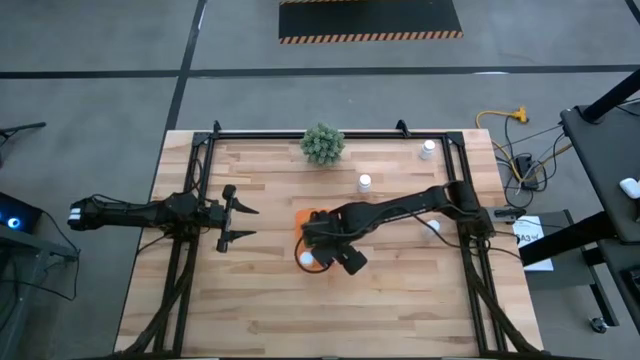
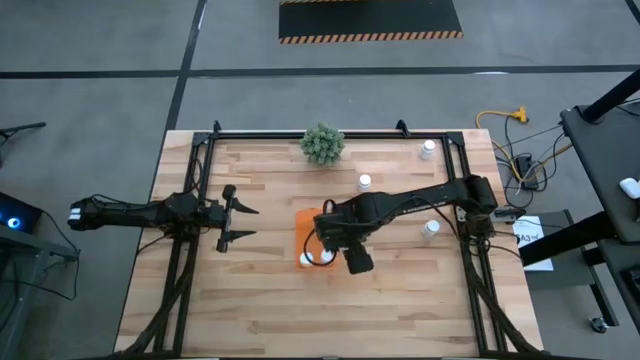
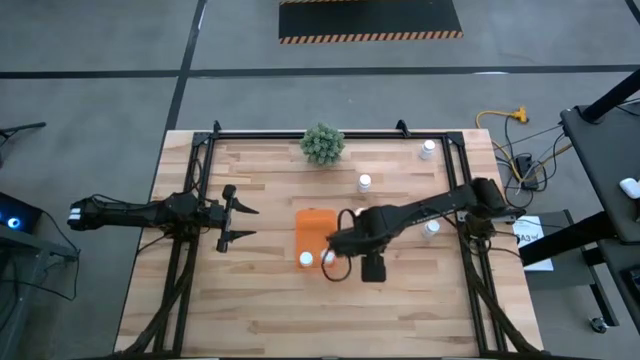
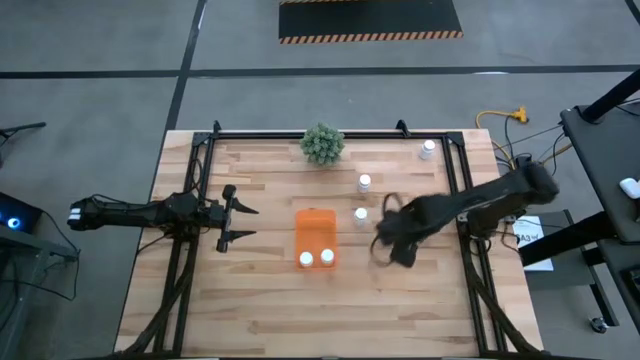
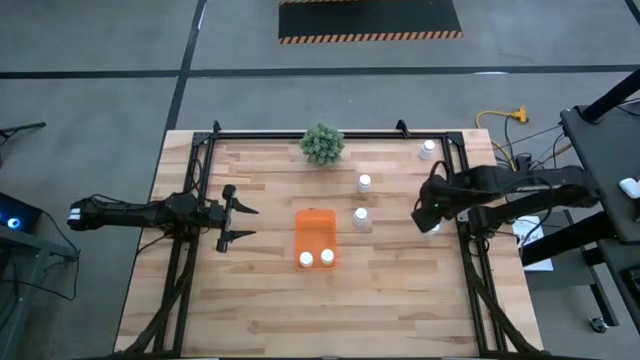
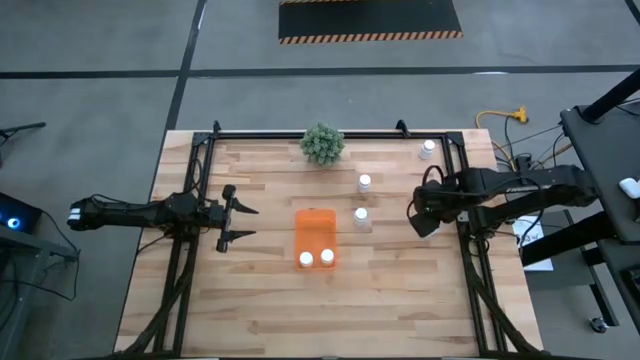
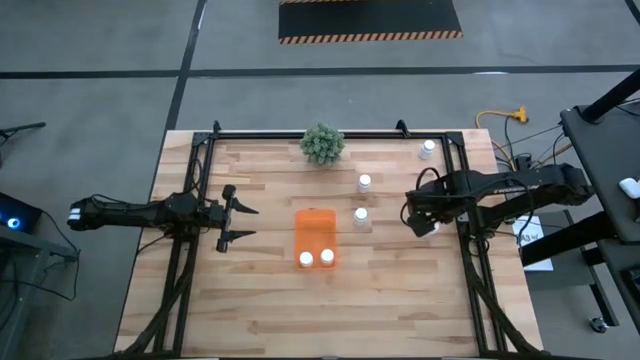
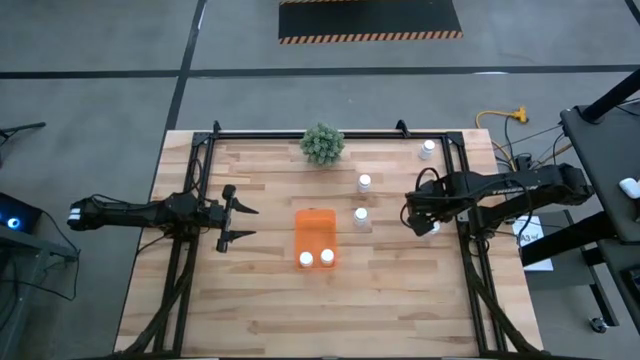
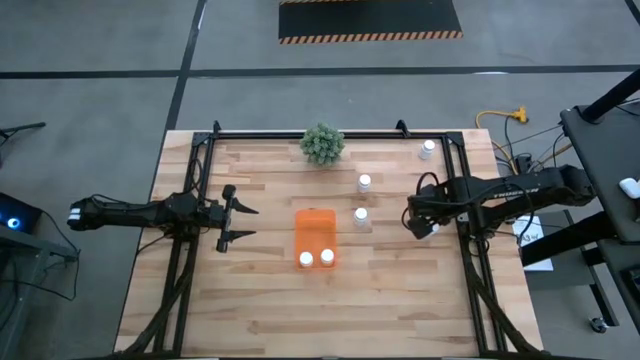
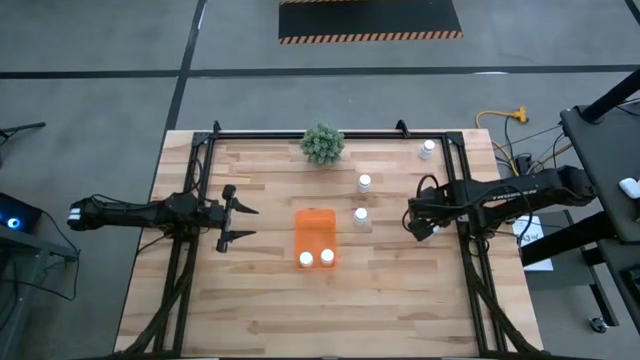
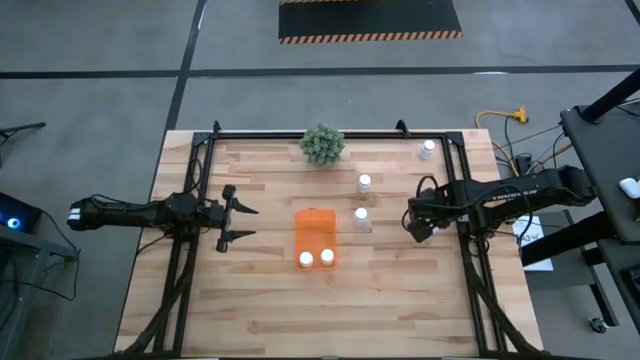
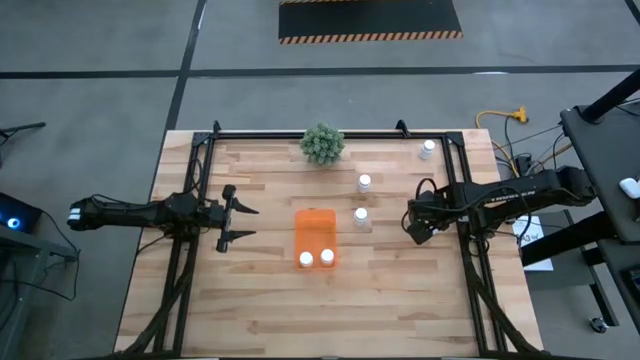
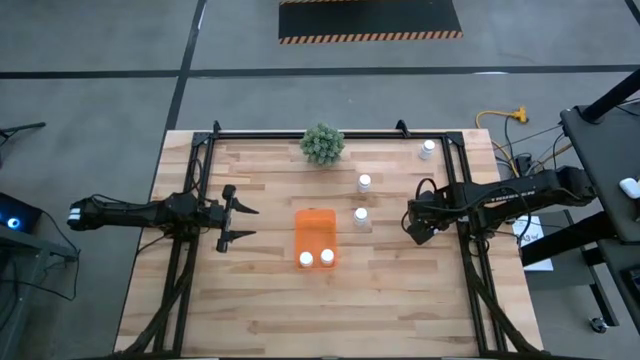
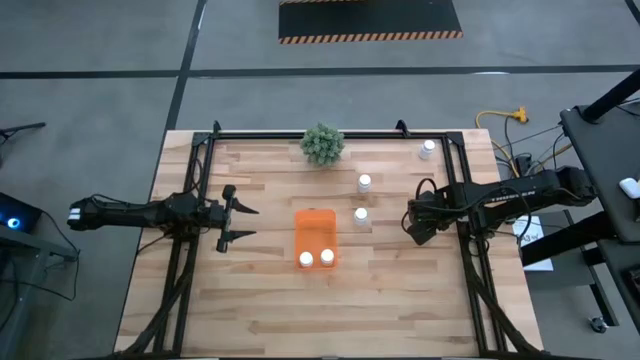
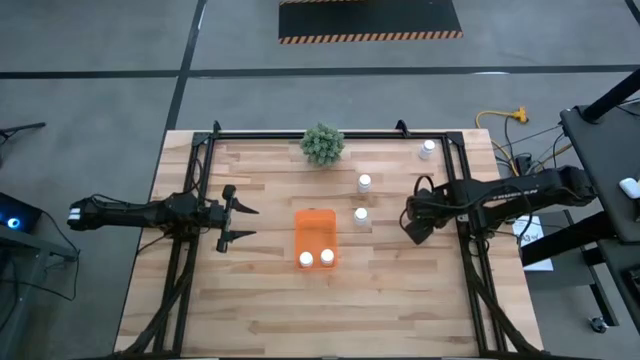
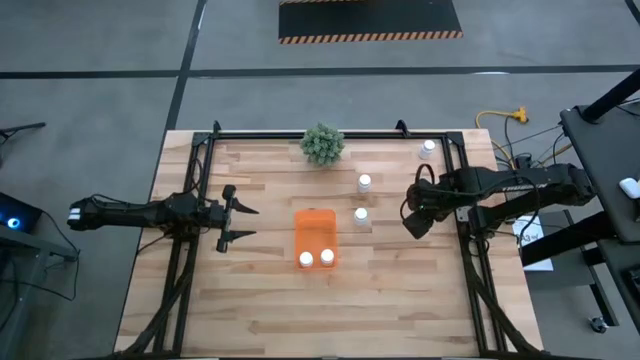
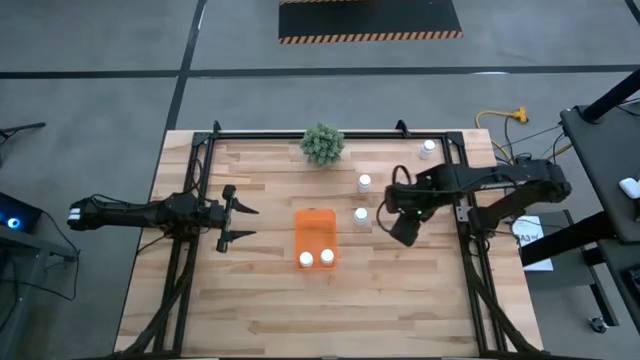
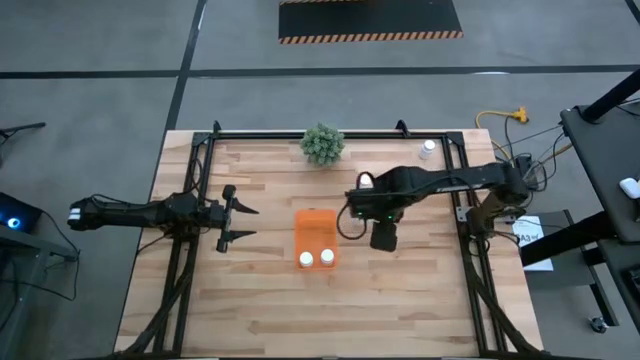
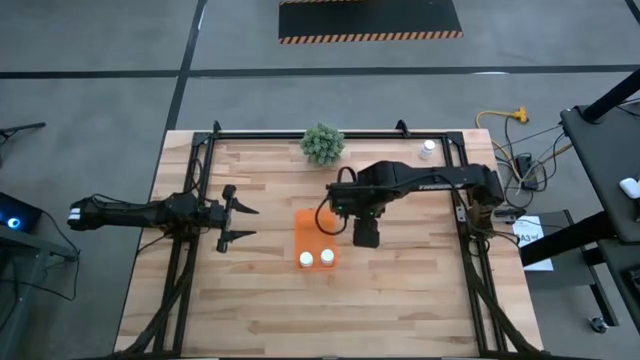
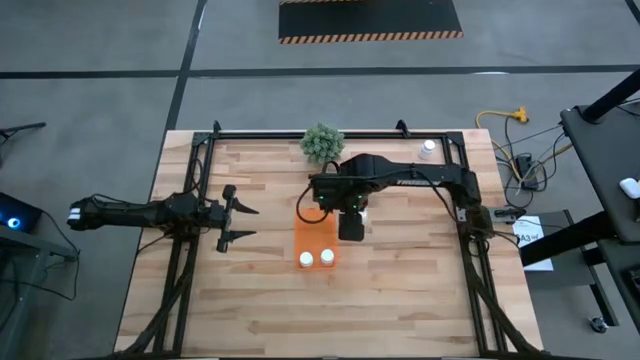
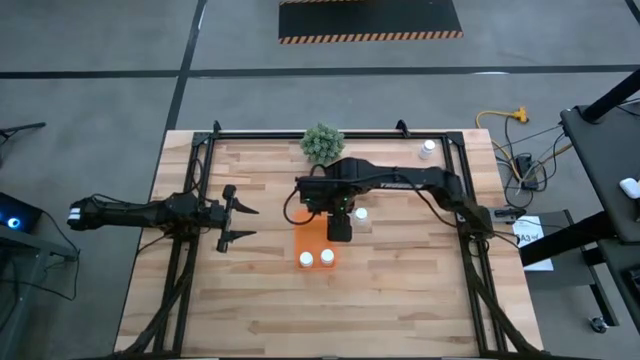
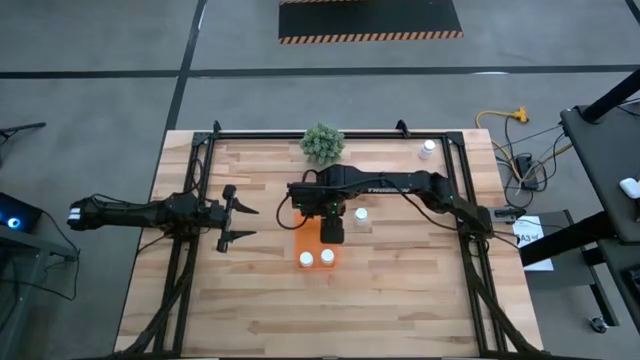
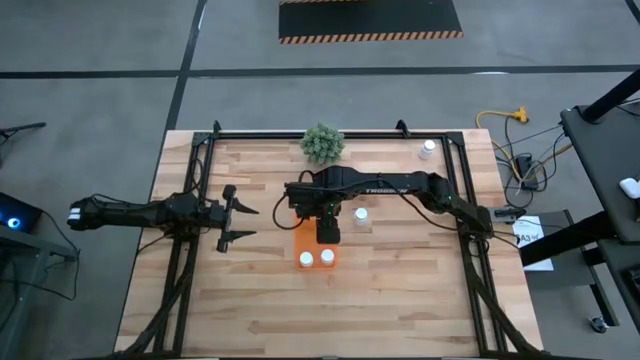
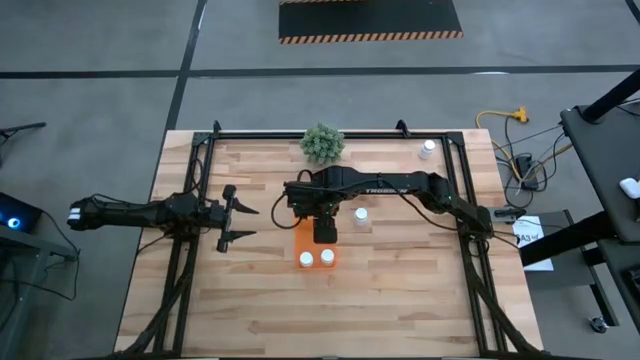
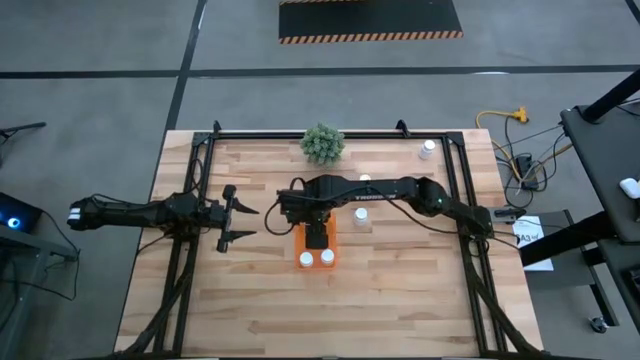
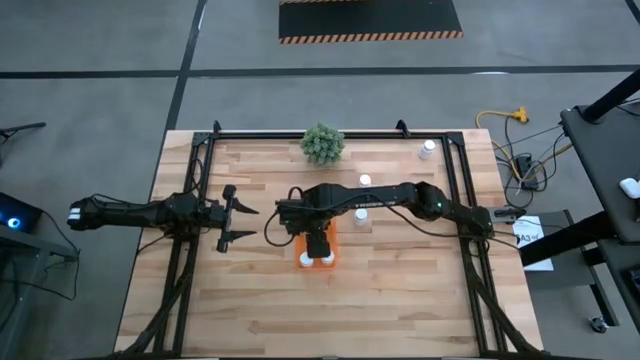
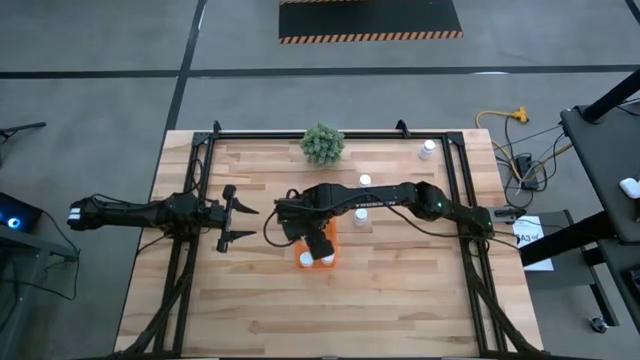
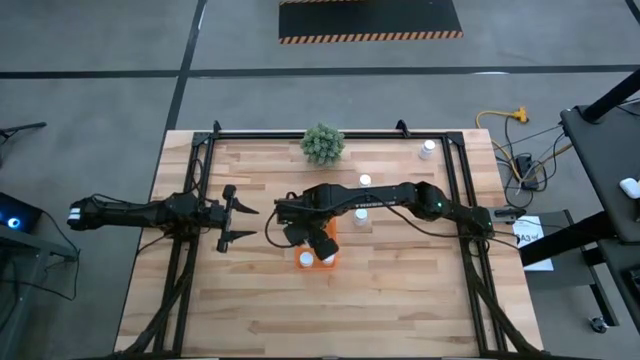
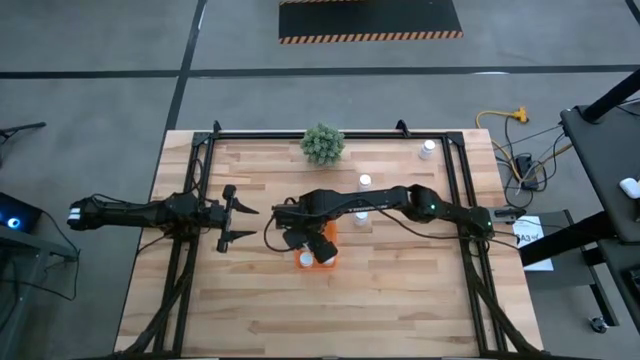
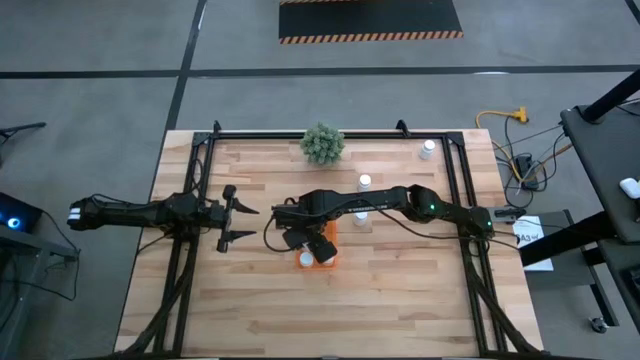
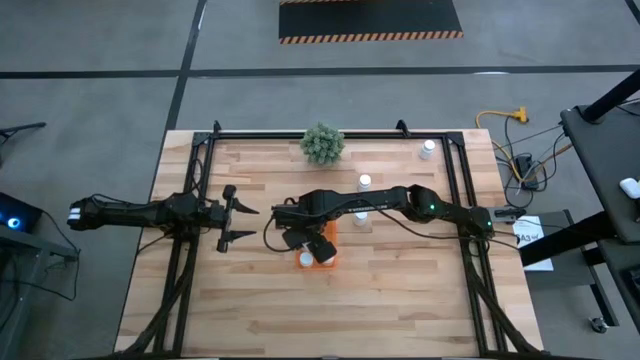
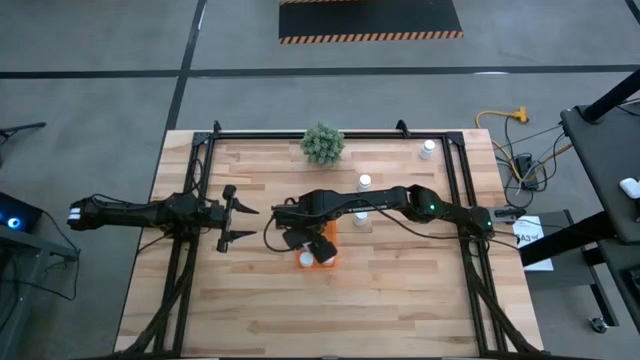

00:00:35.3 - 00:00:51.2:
Task: Pick and place pill bottles into a basket
Put the white pill bottle into the orange bin

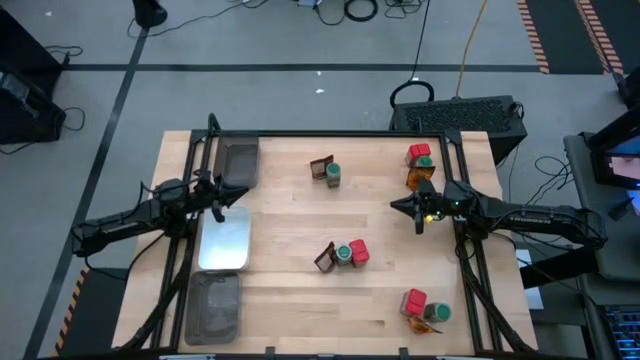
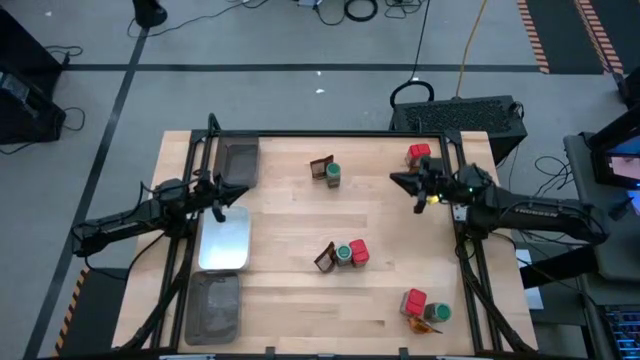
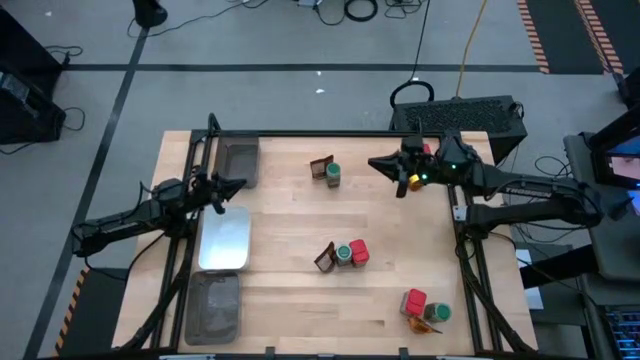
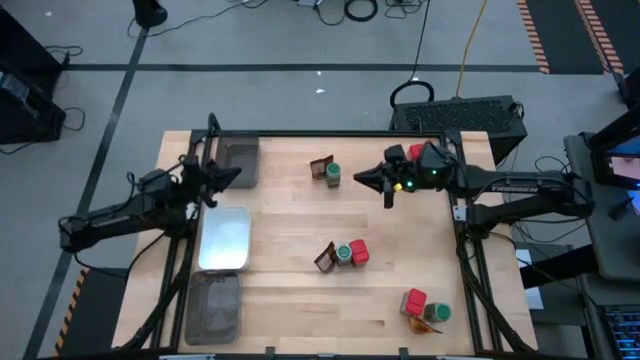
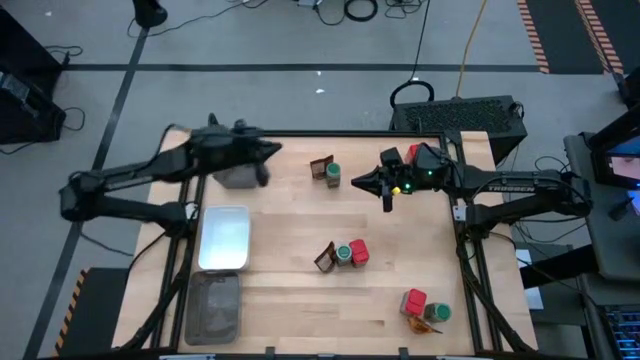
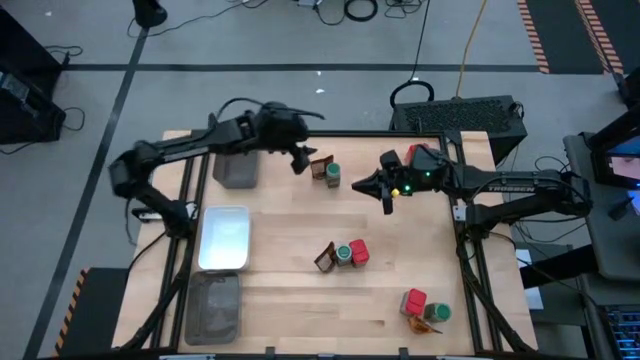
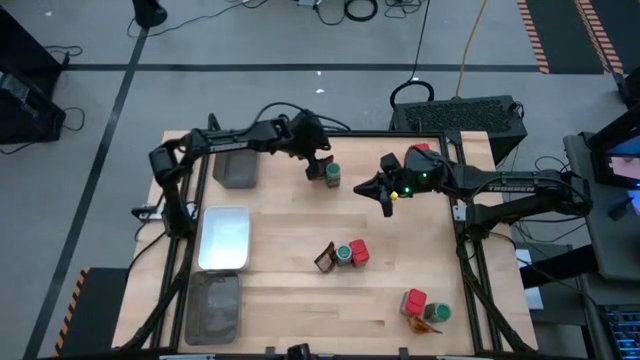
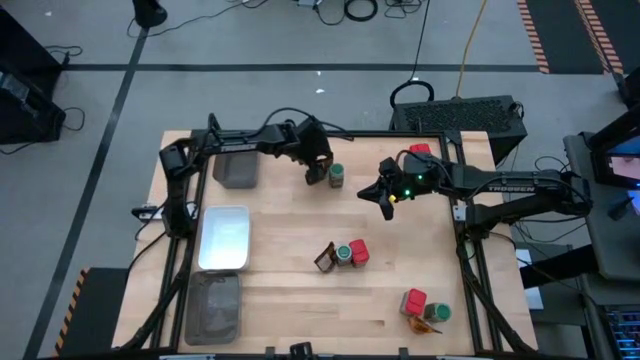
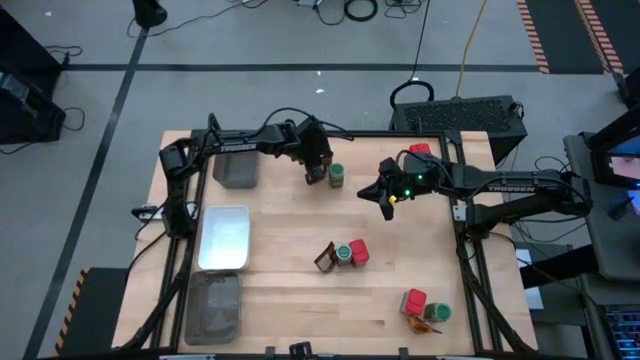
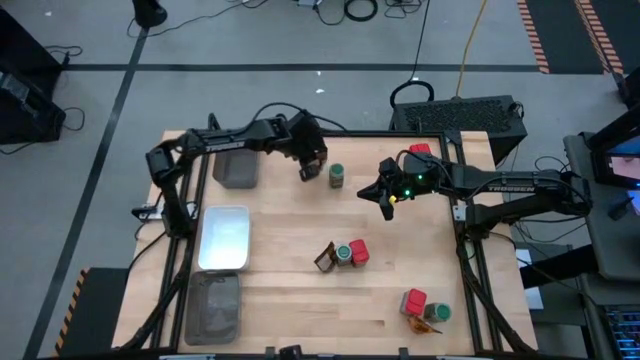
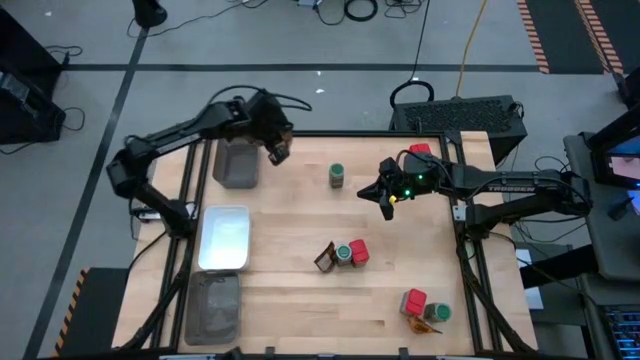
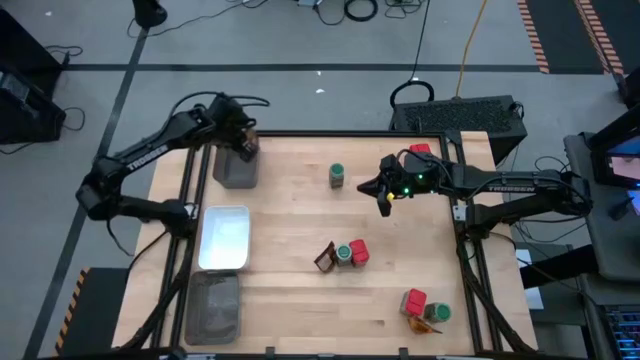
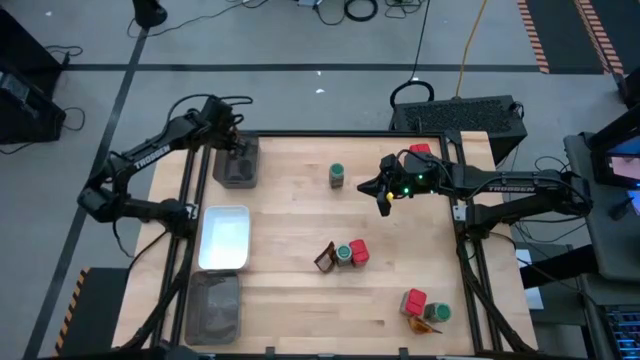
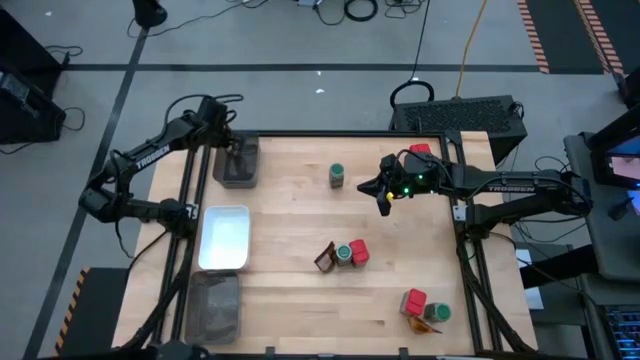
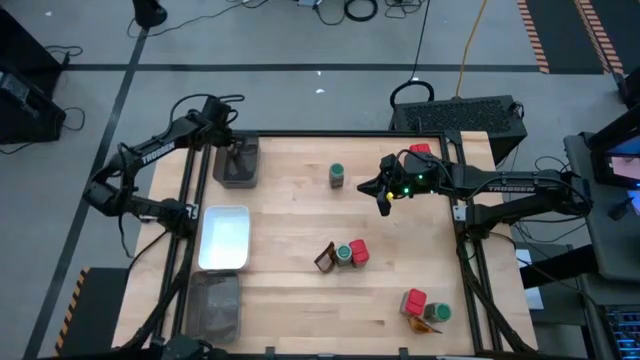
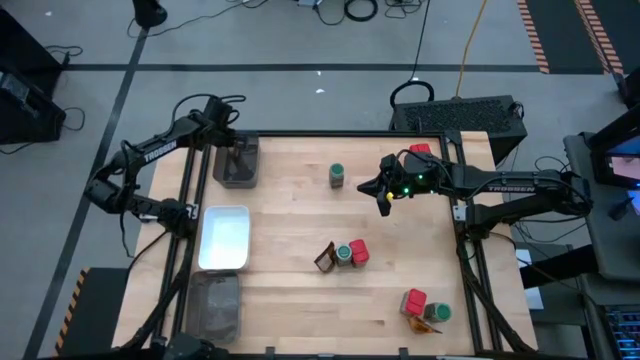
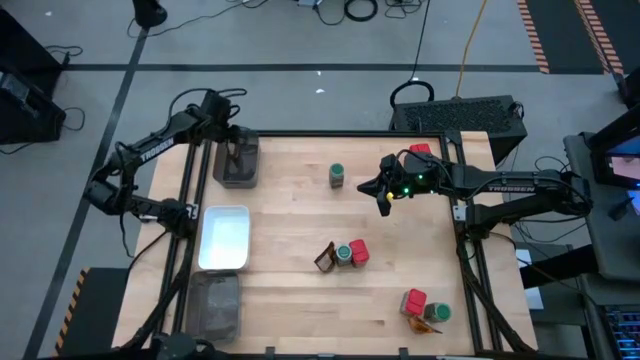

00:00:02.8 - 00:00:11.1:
Task: Sort spices by type
Put the top left orange seasoning pack into the top black bin
